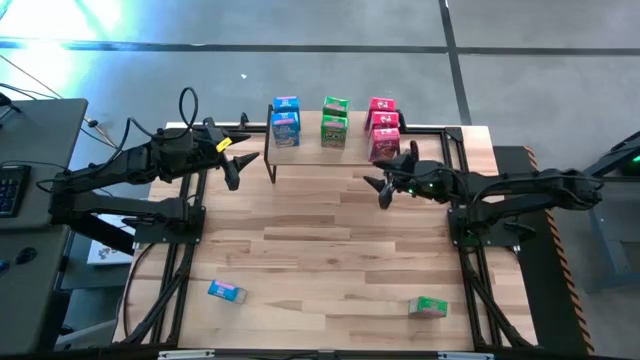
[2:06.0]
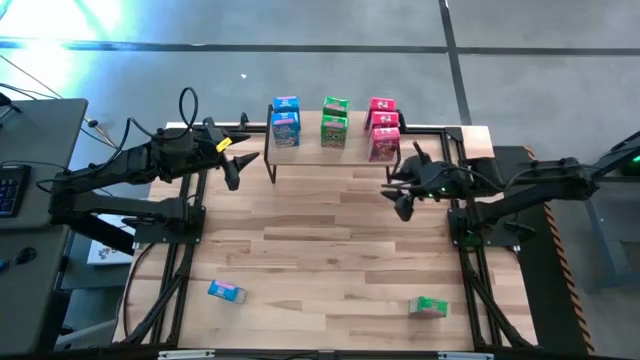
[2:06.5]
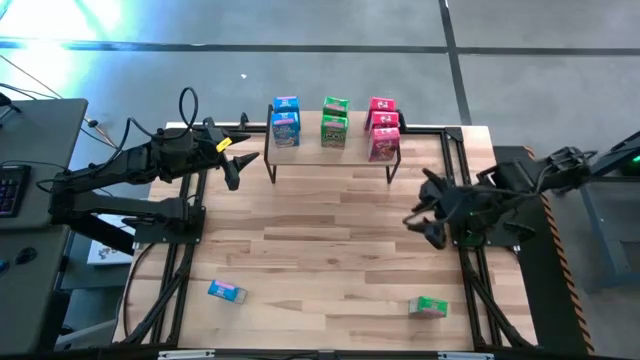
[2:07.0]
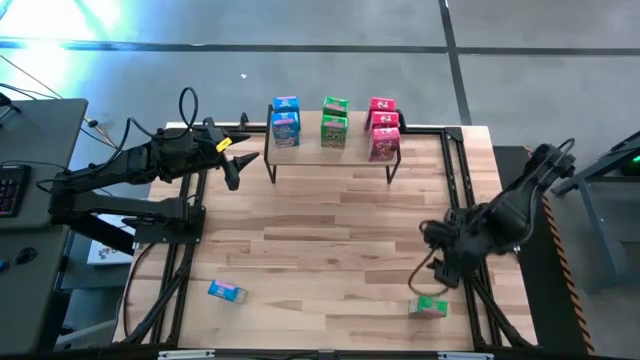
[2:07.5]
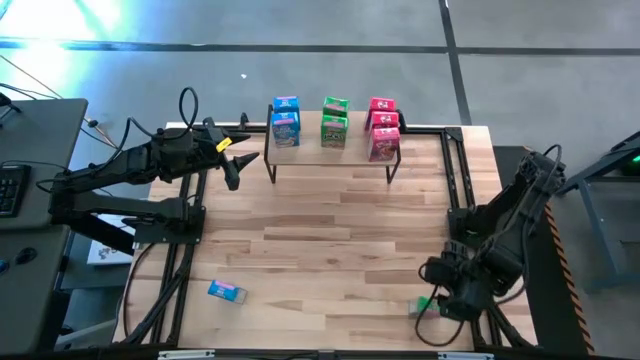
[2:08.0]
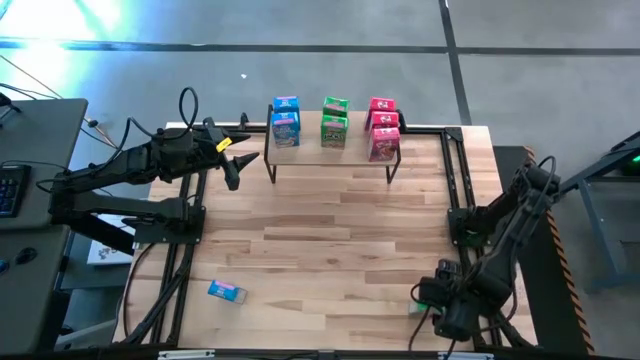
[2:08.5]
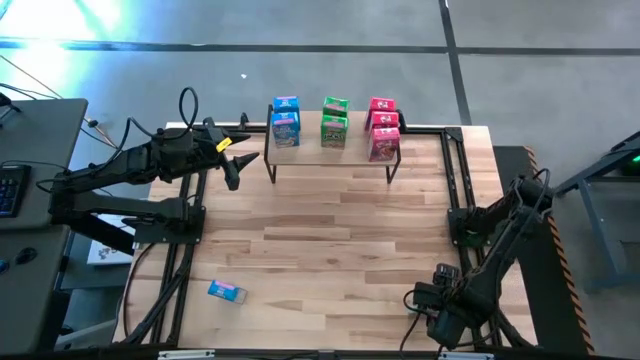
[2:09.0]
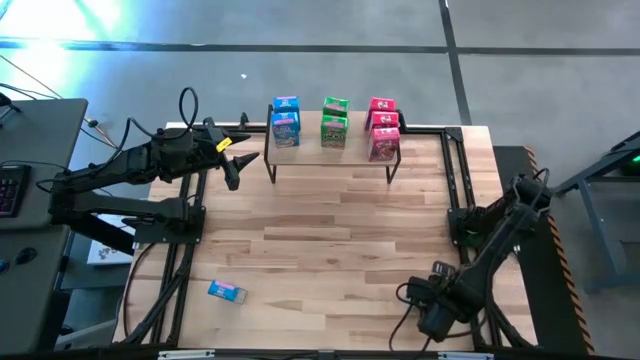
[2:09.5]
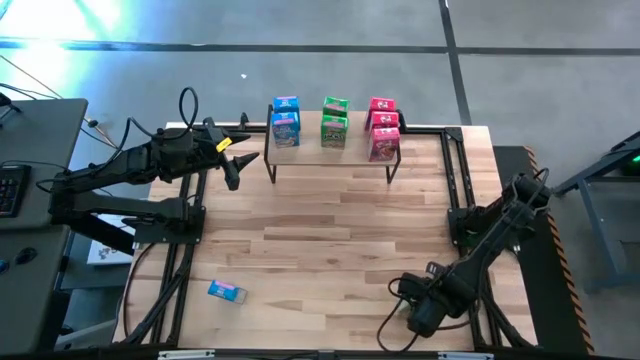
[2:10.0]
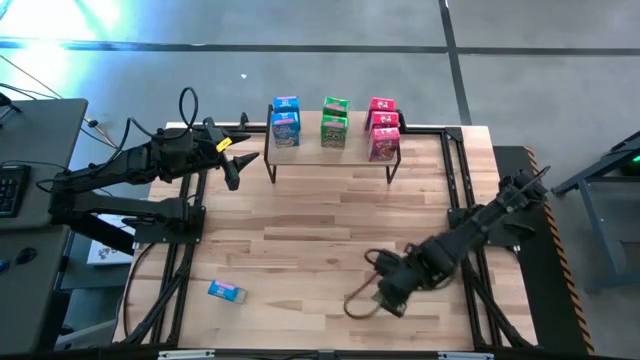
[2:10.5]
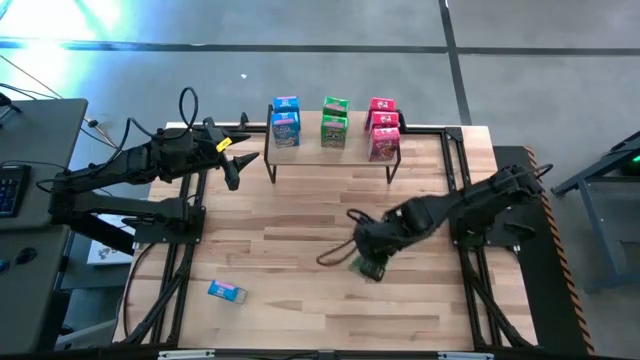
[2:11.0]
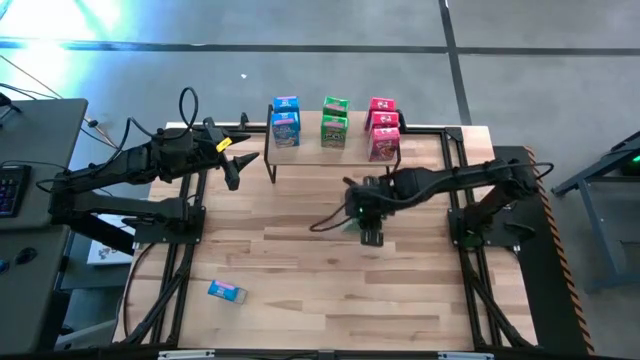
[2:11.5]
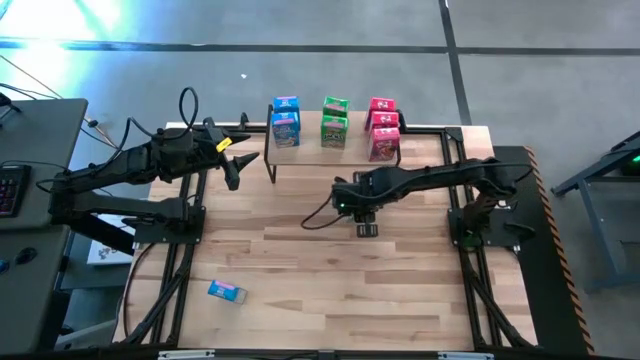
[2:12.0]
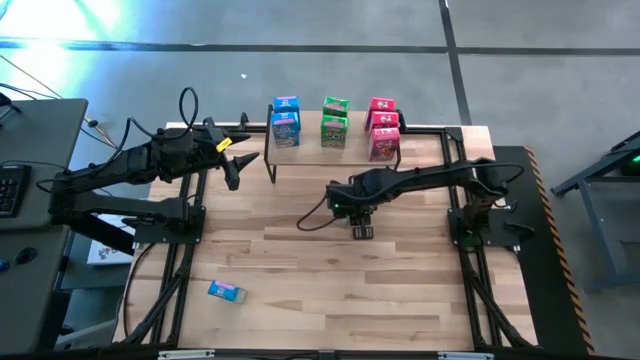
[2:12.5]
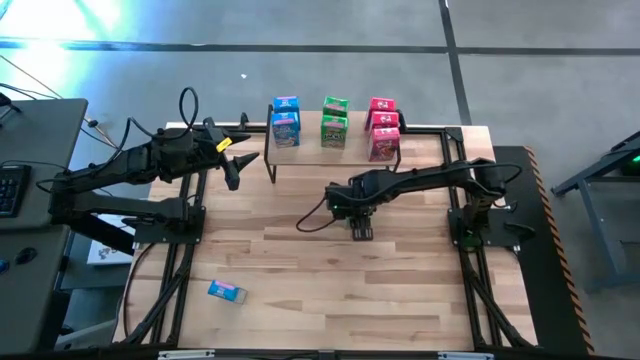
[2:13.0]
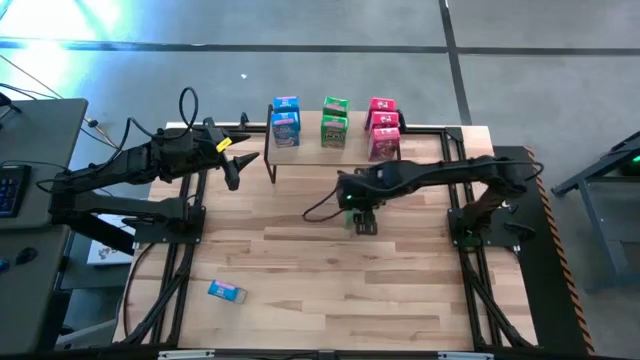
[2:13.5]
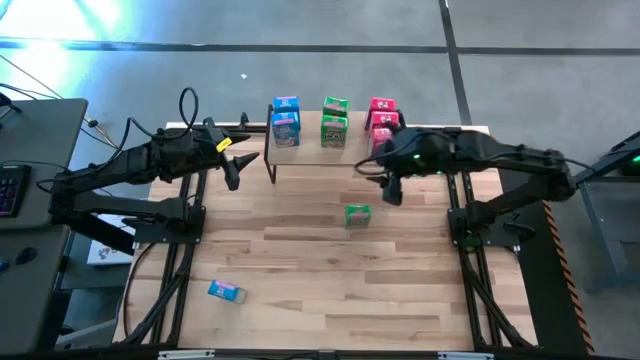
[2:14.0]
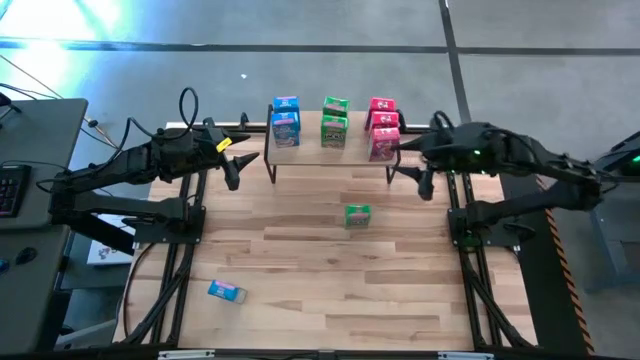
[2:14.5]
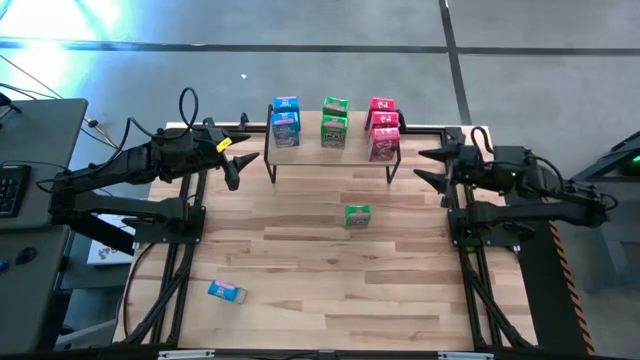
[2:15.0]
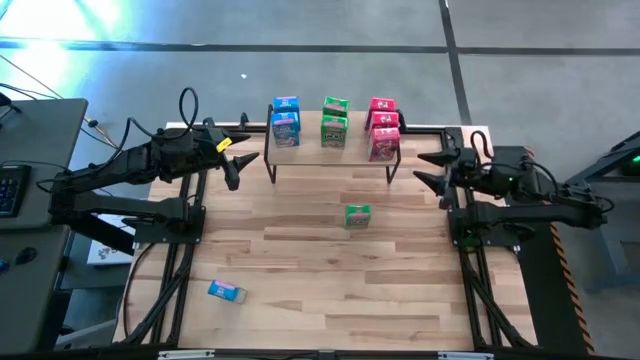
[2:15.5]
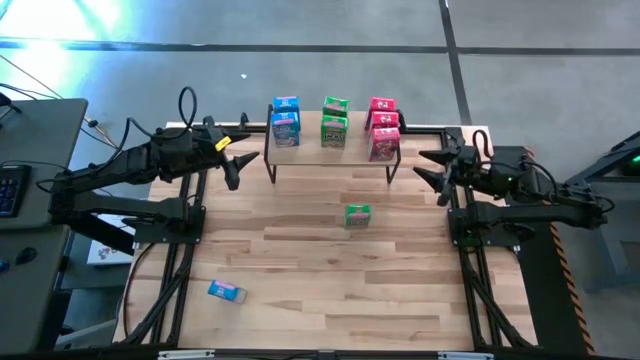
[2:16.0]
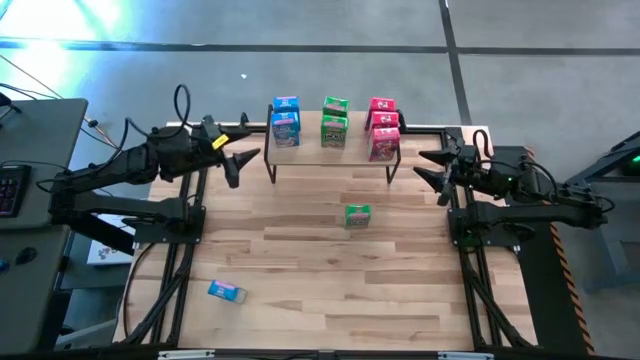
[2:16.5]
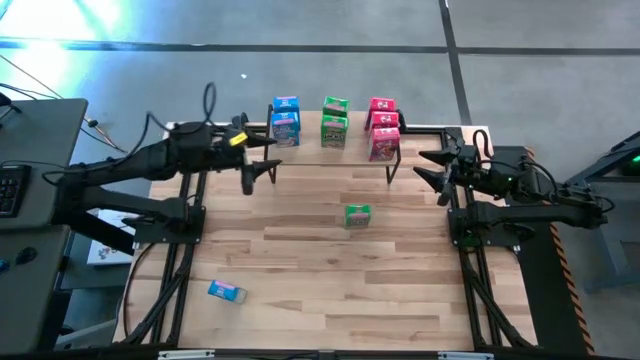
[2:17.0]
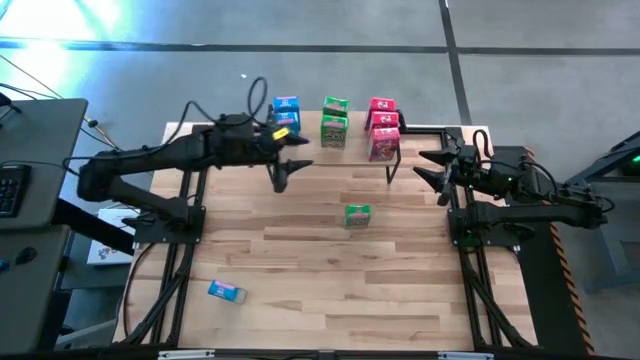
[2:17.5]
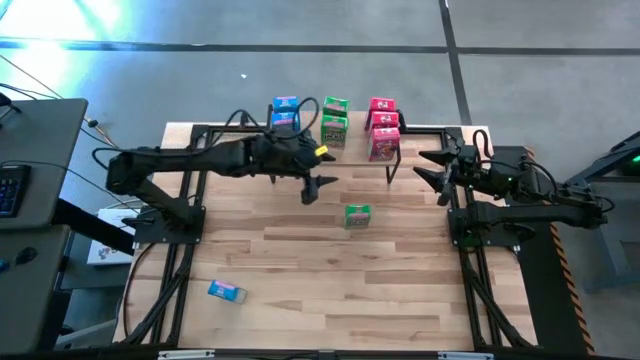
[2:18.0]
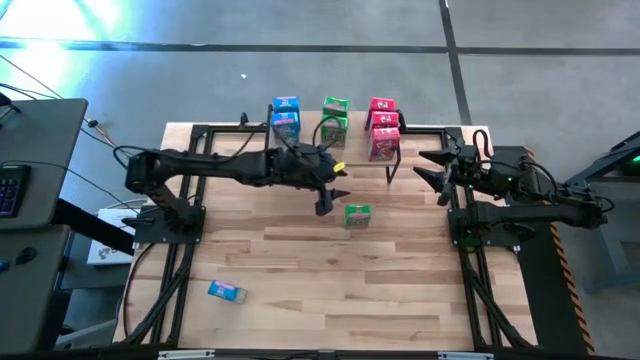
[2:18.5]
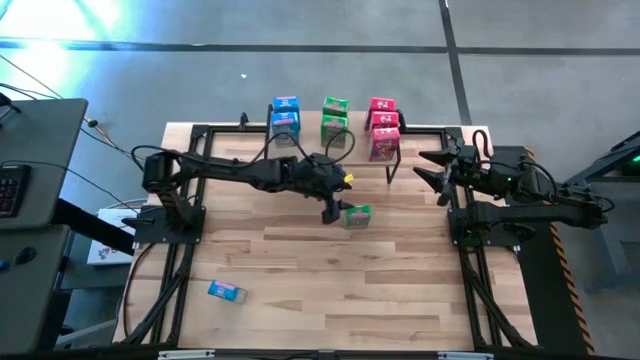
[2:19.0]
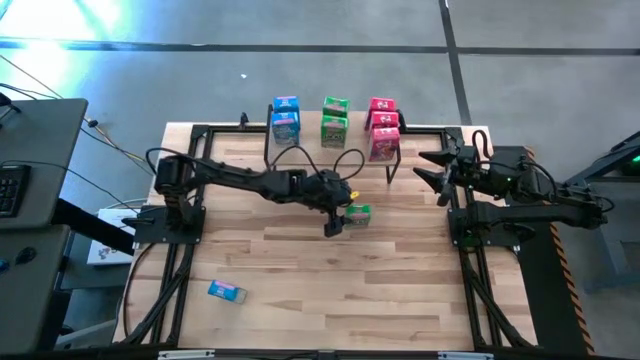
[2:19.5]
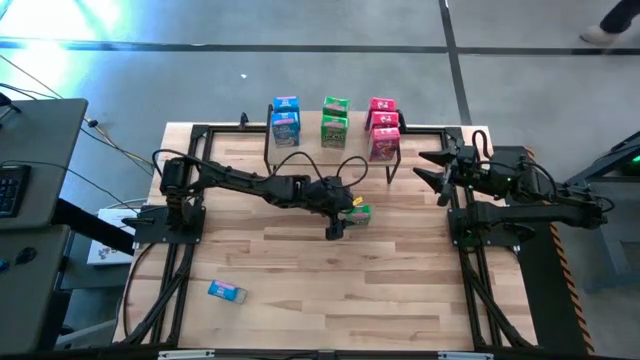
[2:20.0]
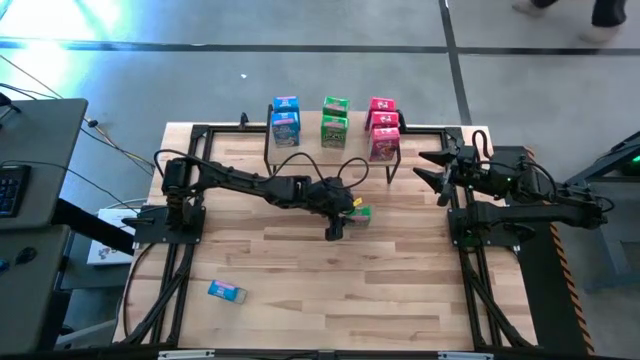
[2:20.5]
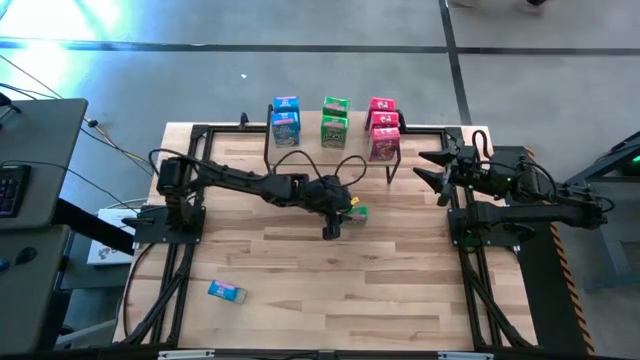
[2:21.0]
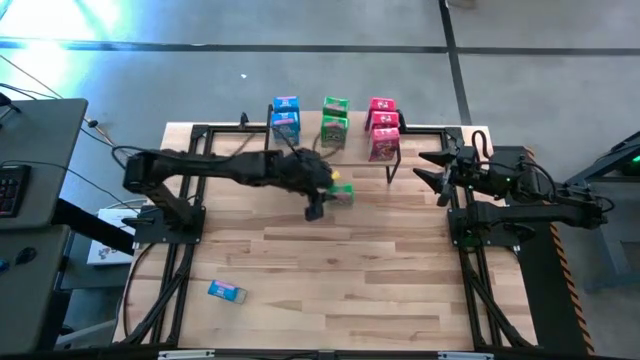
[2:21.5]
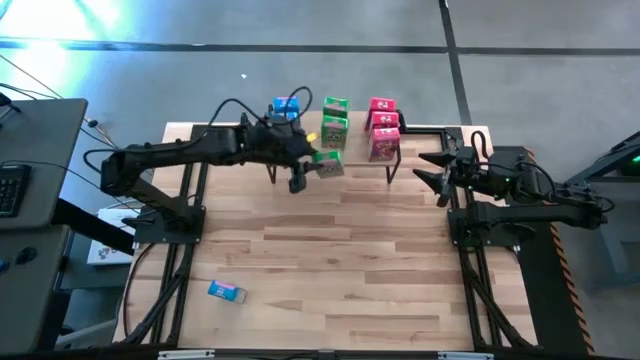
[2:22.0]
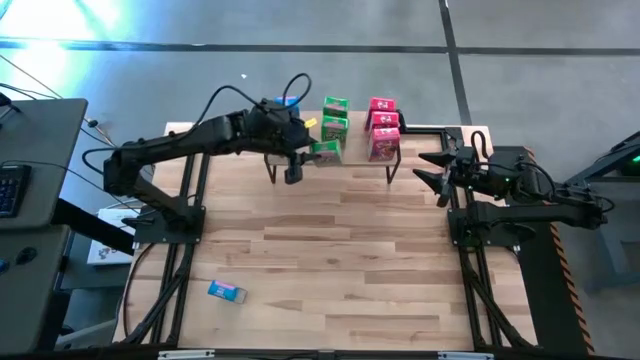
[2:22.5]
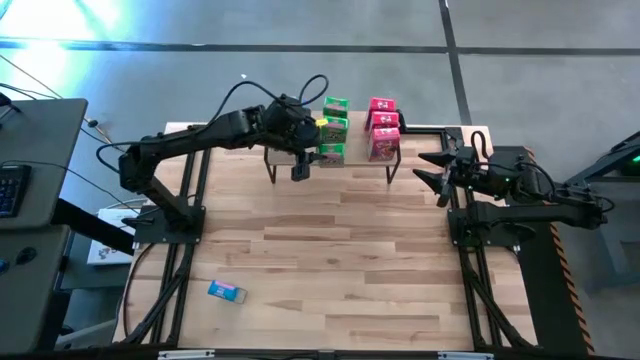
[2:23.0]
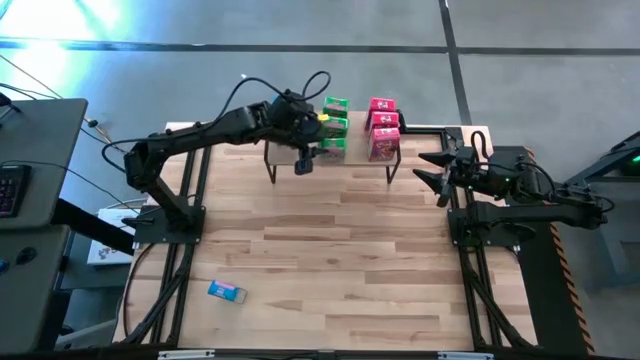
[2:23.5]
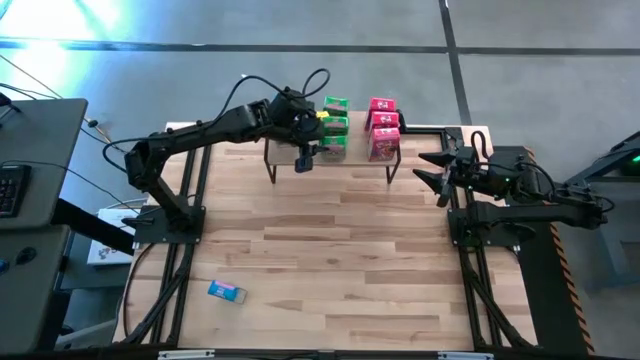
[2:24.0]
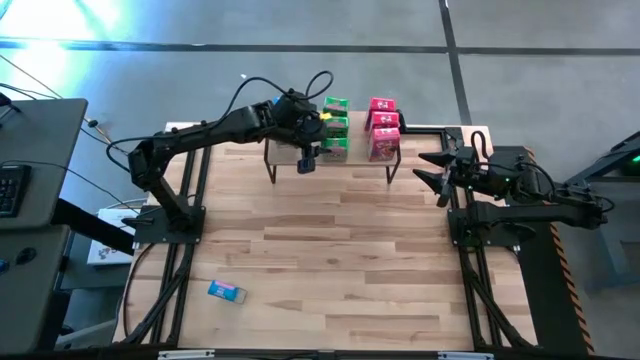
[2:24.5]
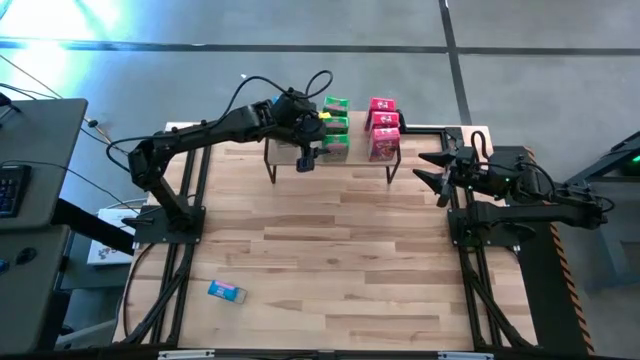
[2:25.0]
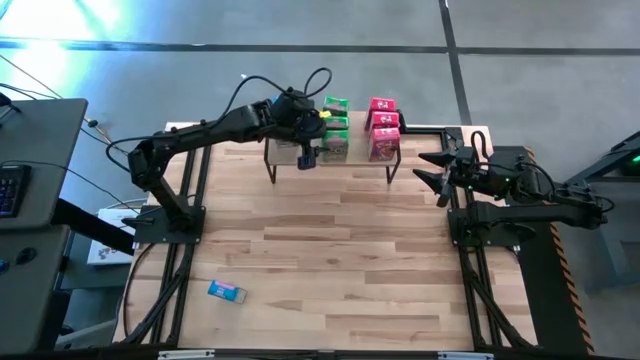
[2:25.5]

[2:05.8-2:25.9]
Task: Stack cereal on shelf
Put the green cereal box aligned with the other green cereal boxes on the shelf
